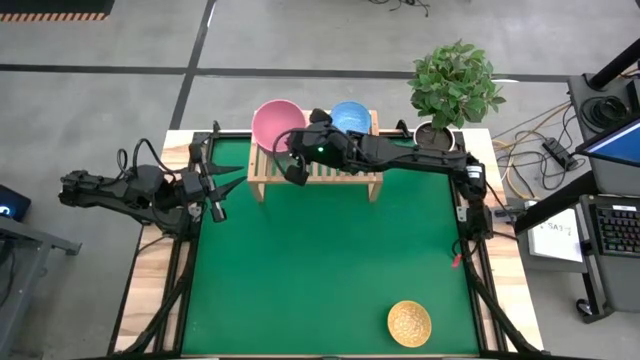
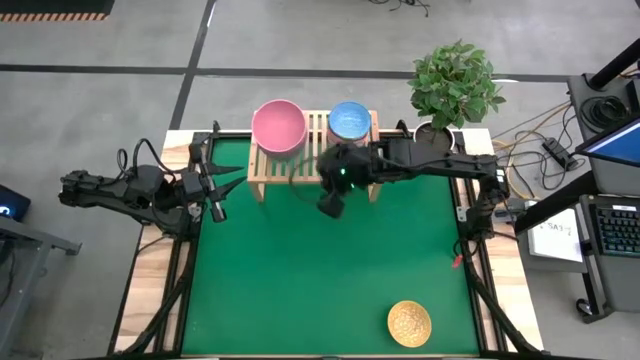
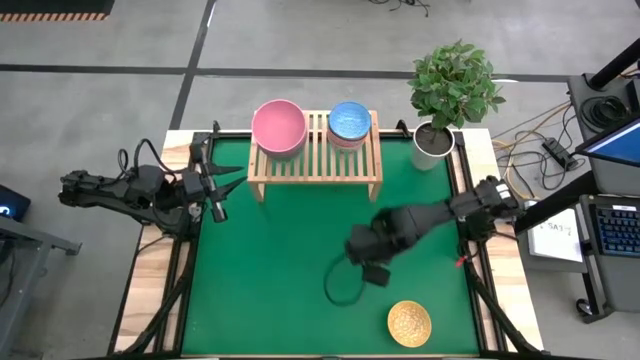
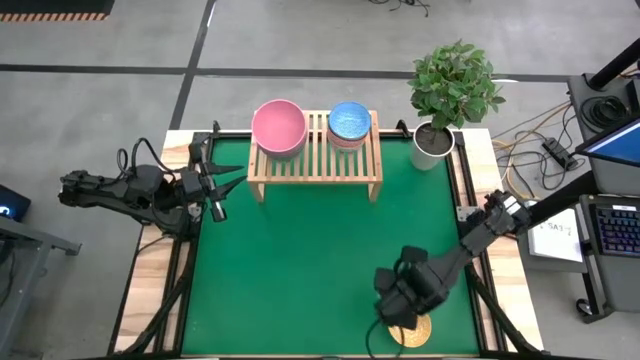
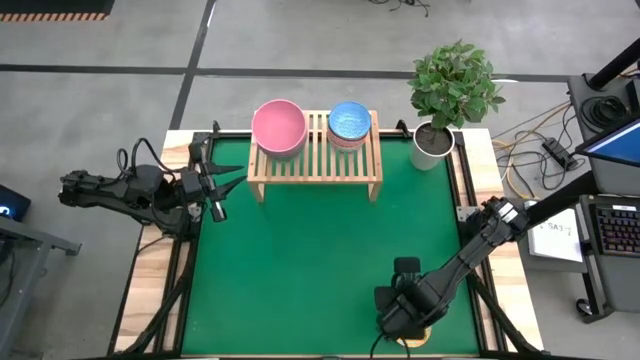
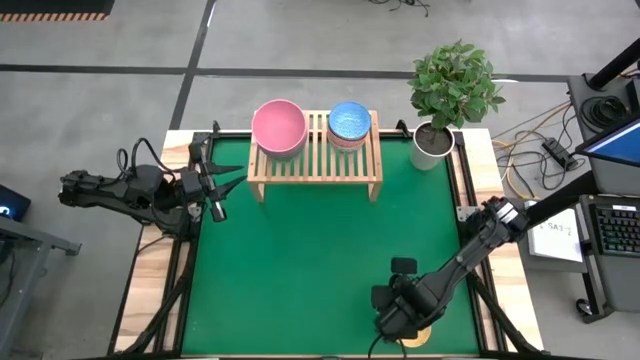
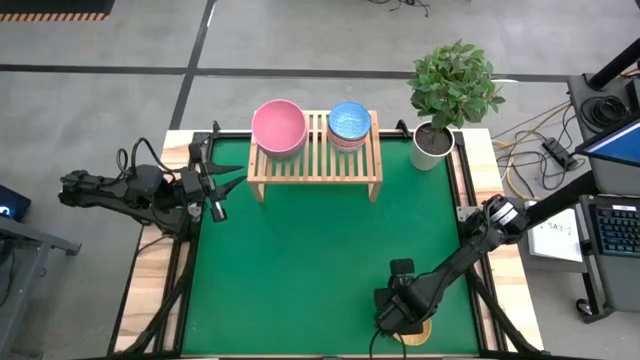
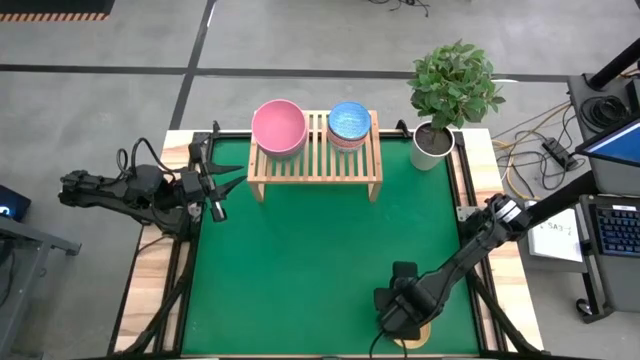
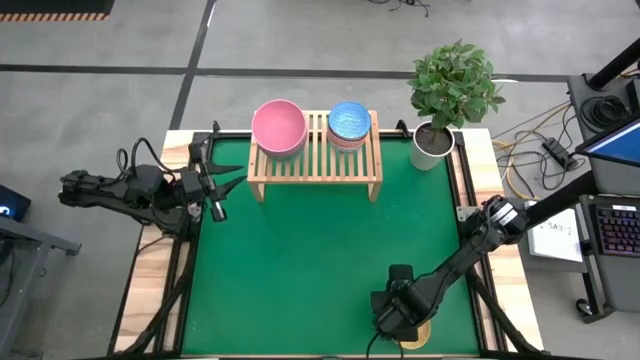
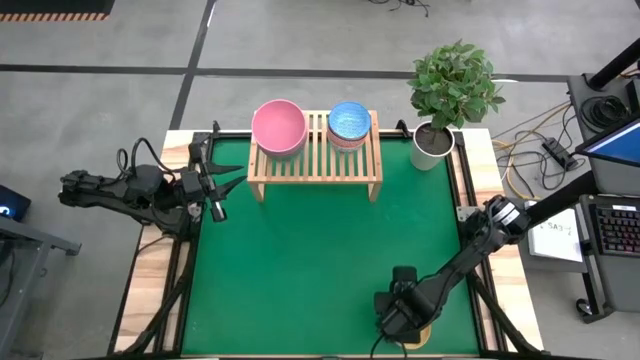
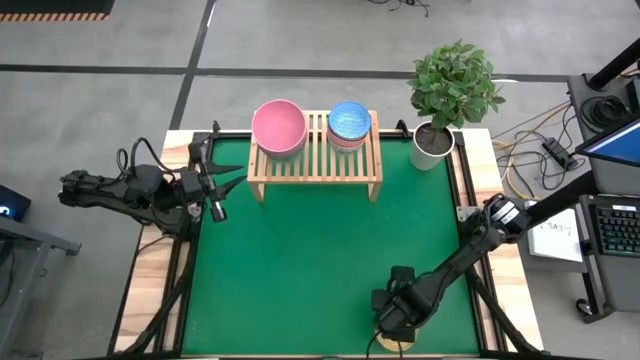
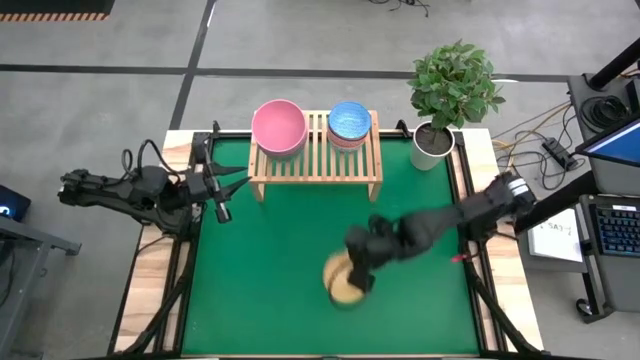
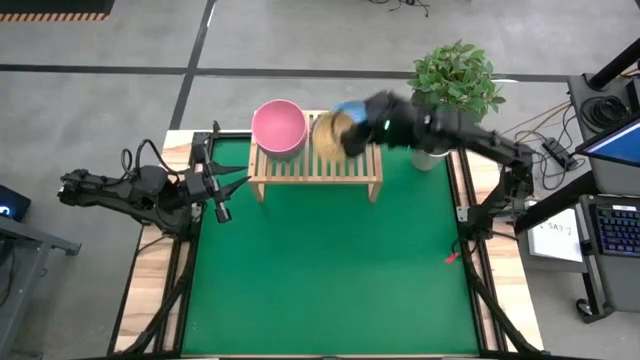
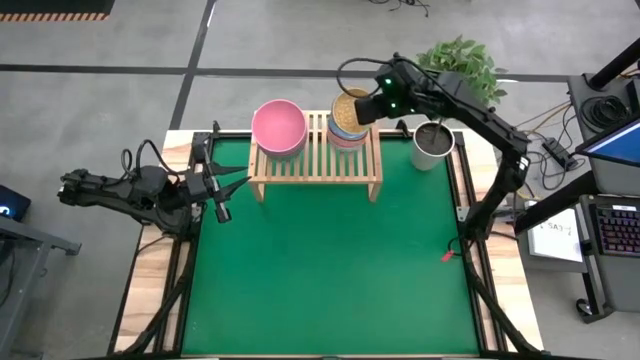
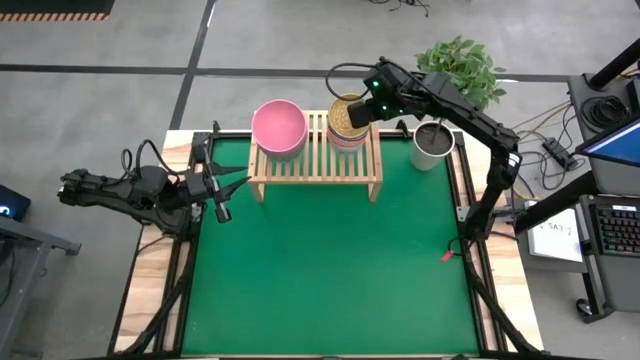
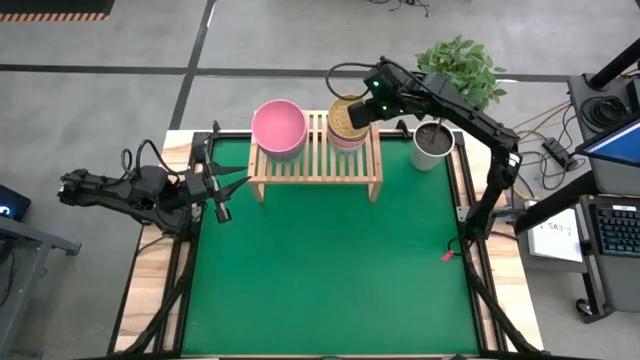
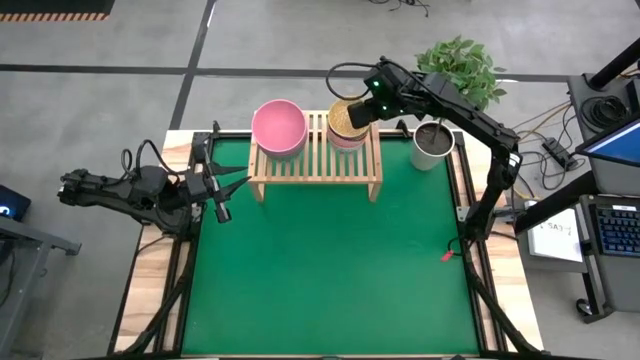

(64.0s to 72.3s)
Task: Place and stack bowls onto a shelf
Stack the small yellow bowl on the small blue bowl on the shelf

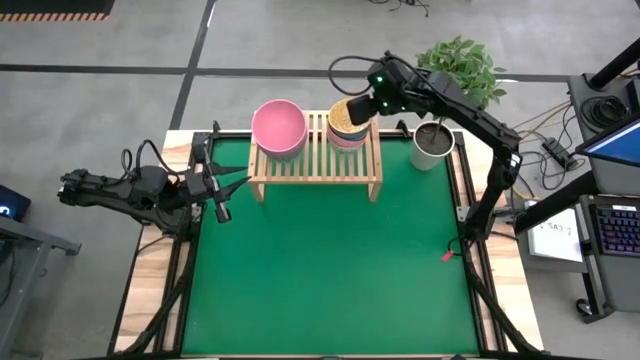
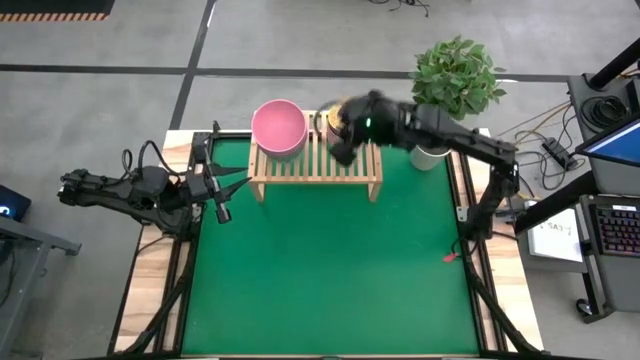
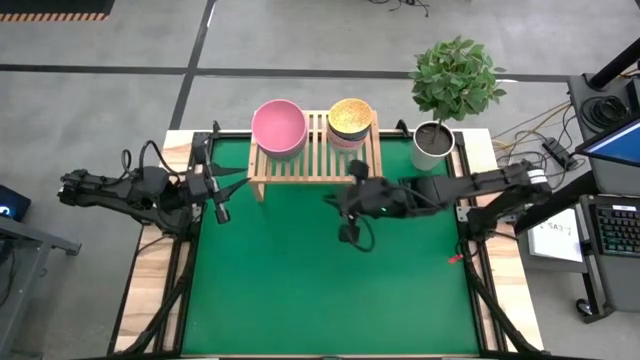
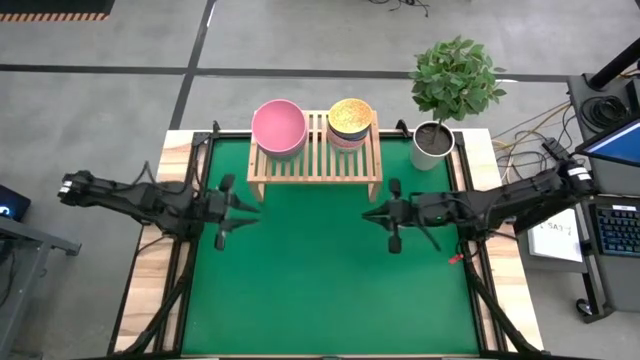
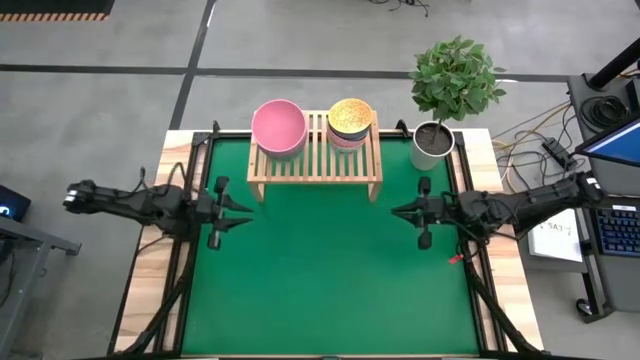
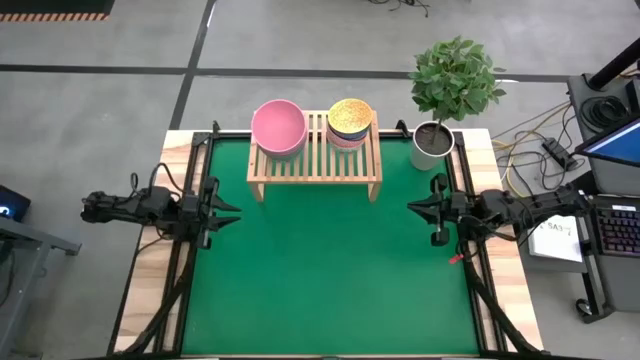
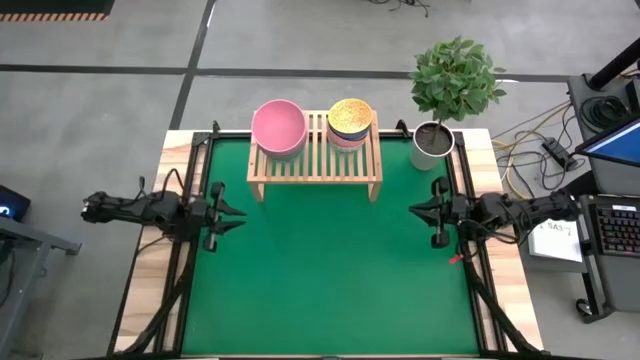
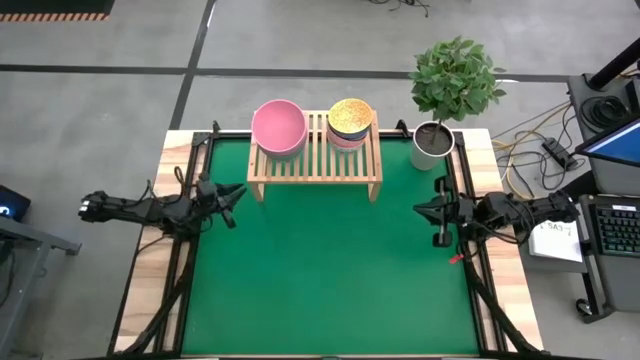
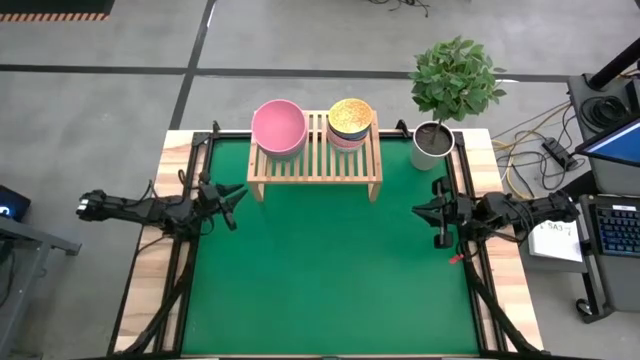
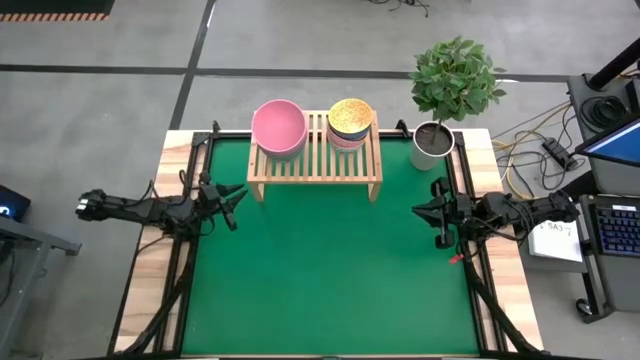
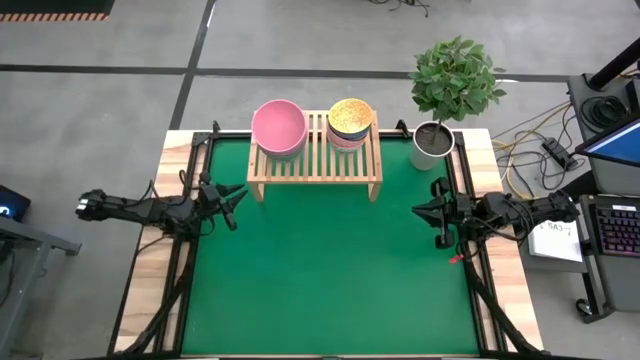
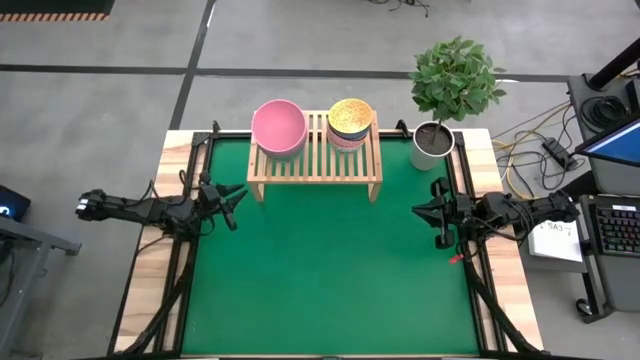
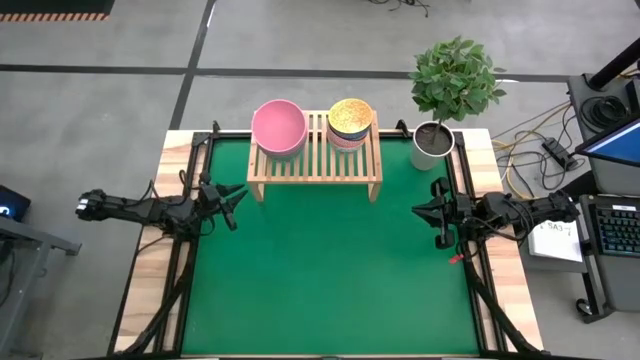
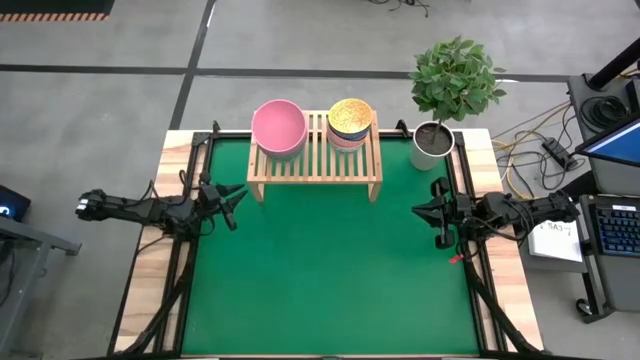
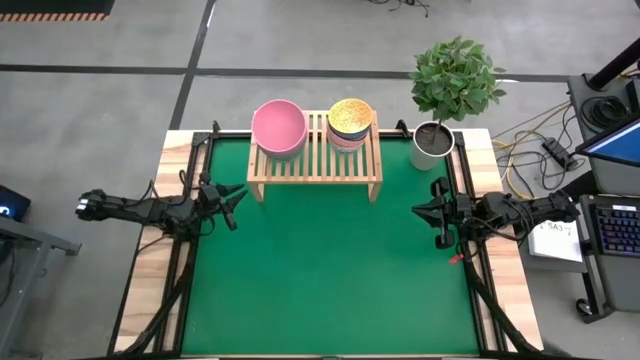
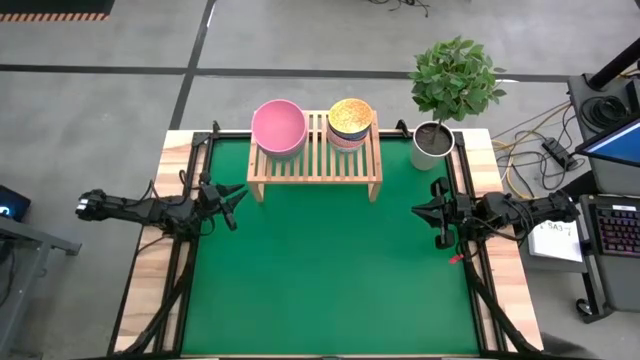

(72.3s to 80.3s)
Return to Home Position

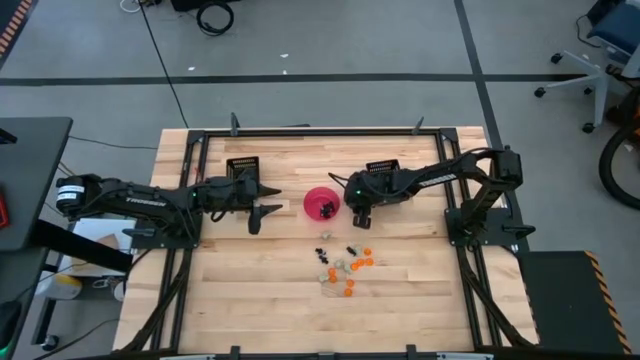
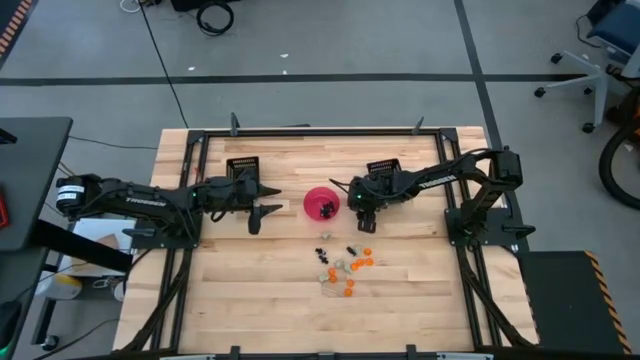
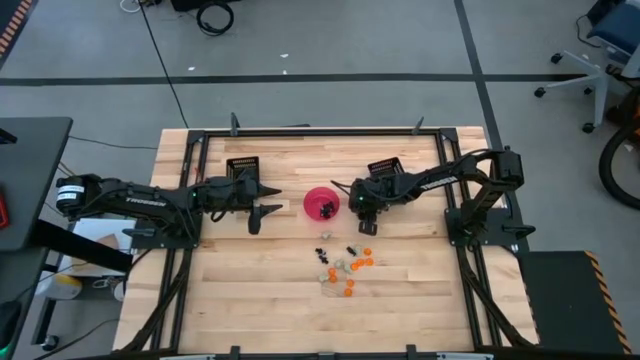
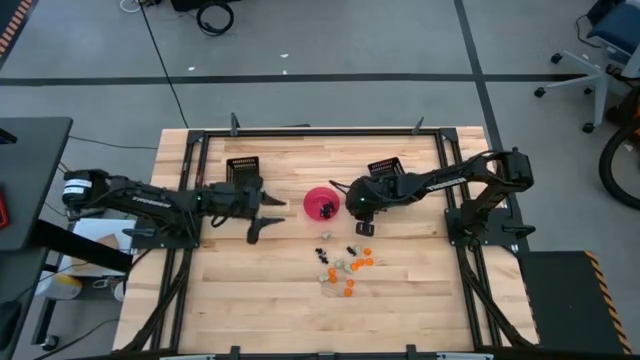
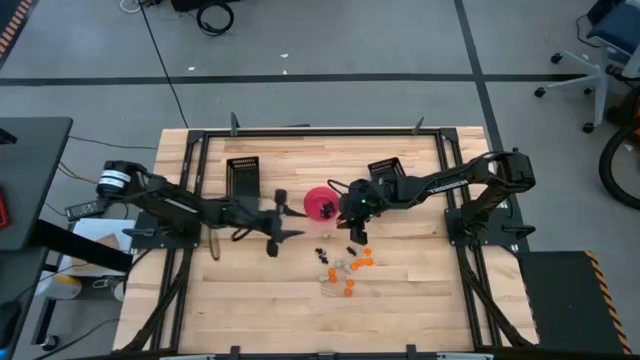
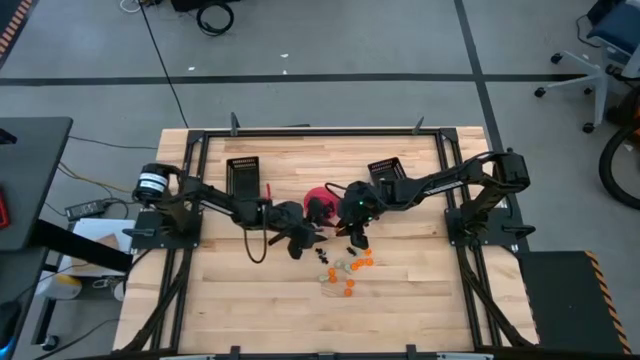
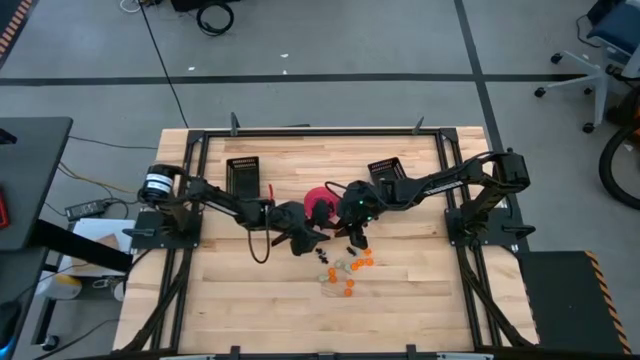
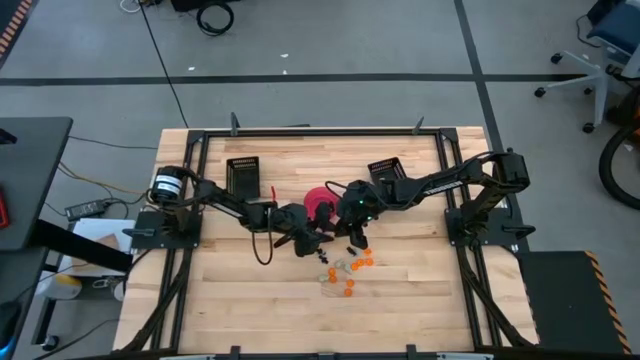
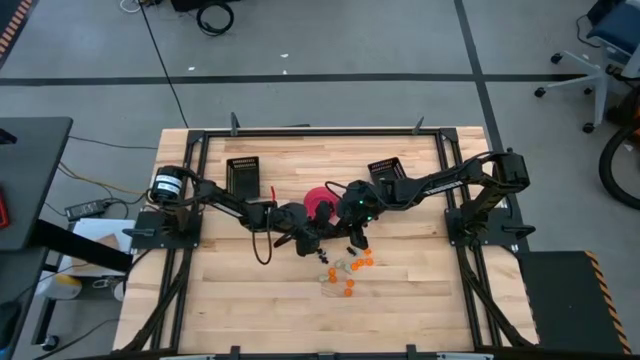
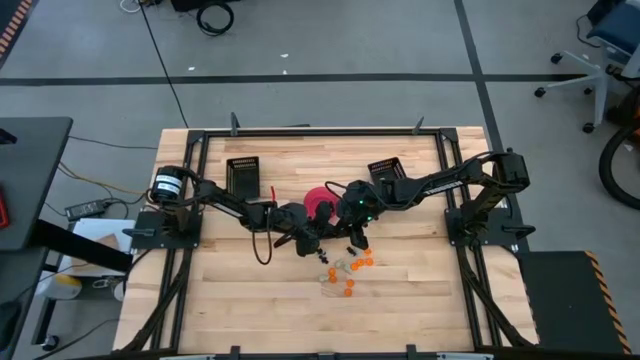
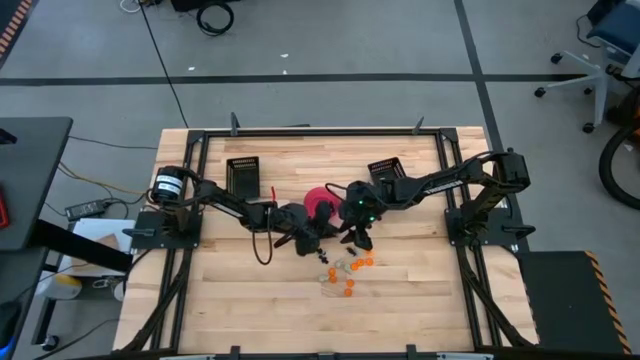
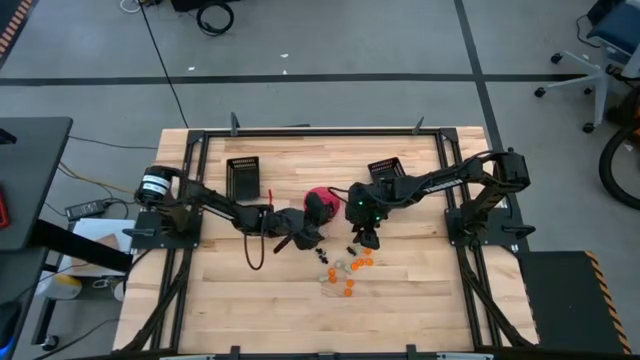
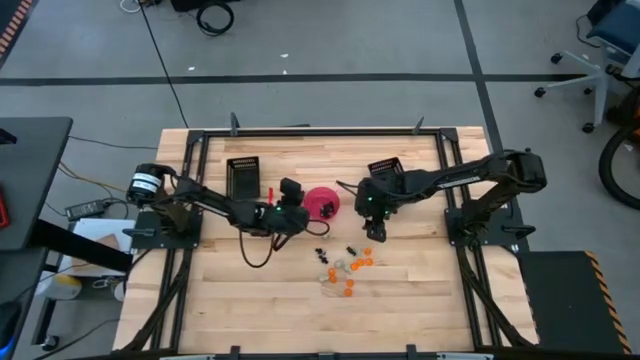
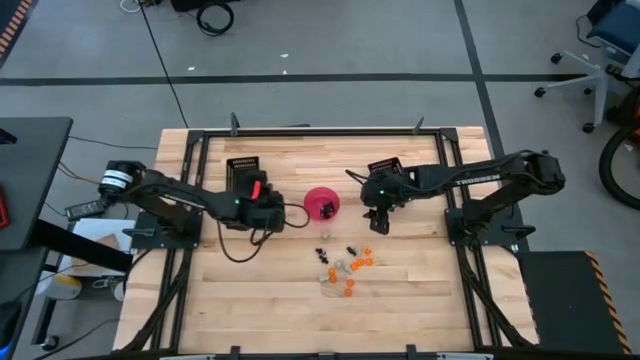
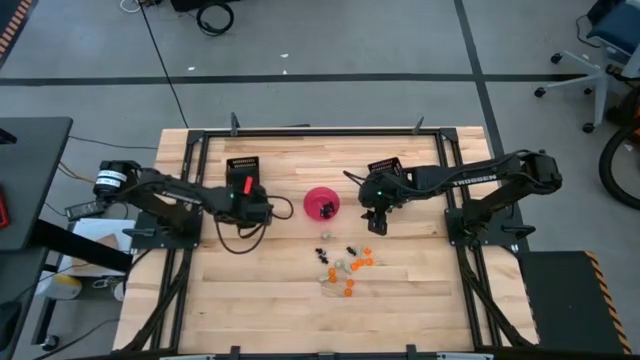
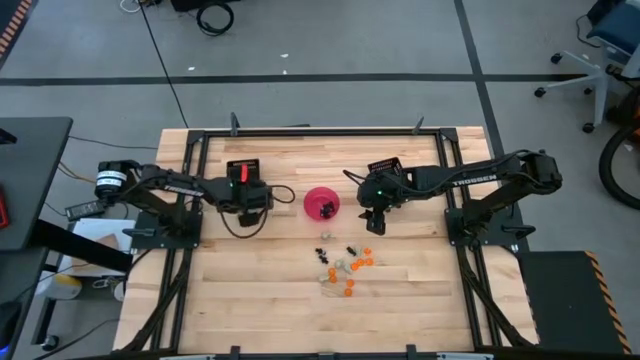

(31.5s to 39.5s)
Task: Sort Halloween decoration
Put the orange pumpkin toy into the the left black bin
